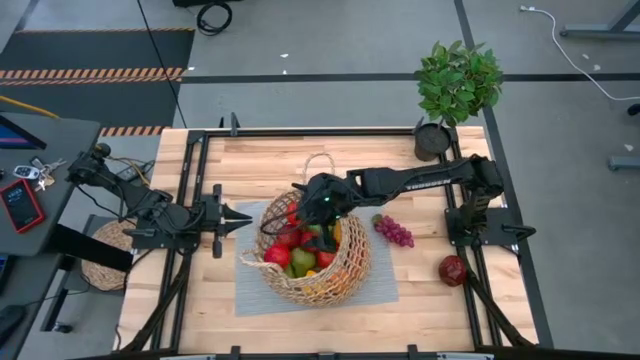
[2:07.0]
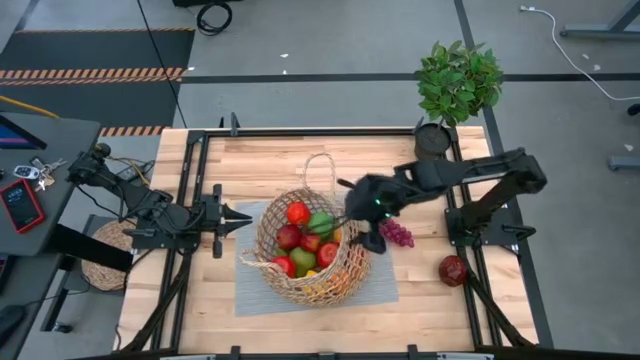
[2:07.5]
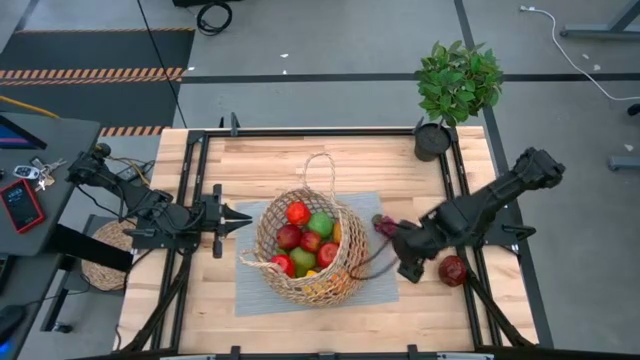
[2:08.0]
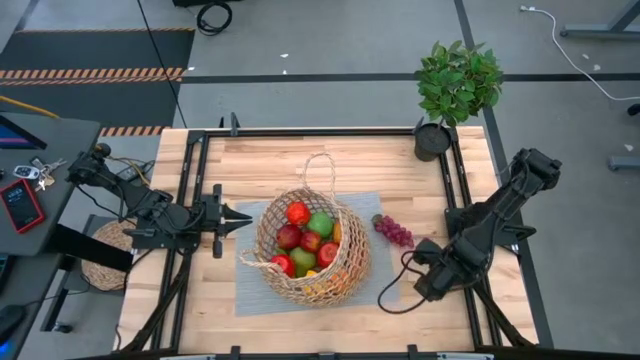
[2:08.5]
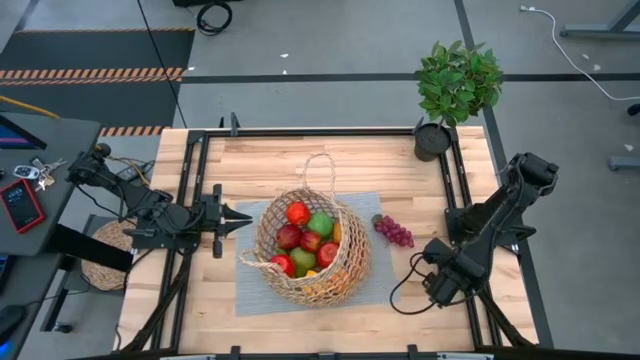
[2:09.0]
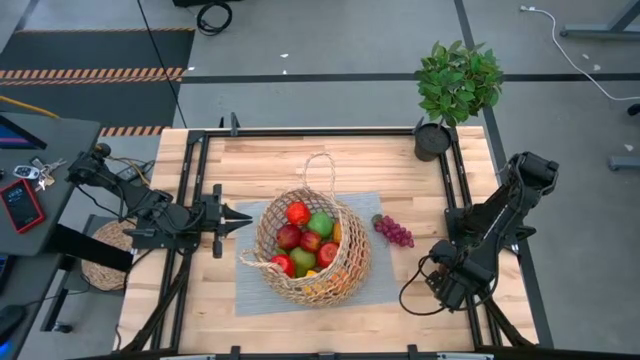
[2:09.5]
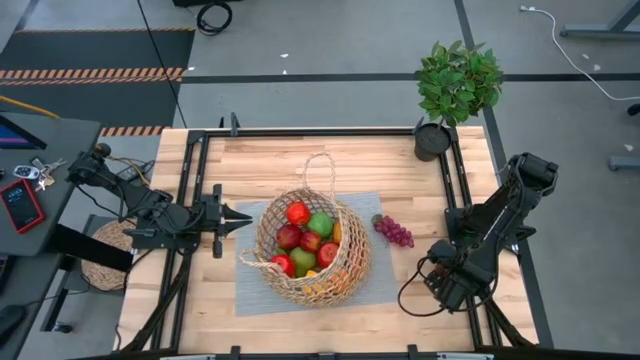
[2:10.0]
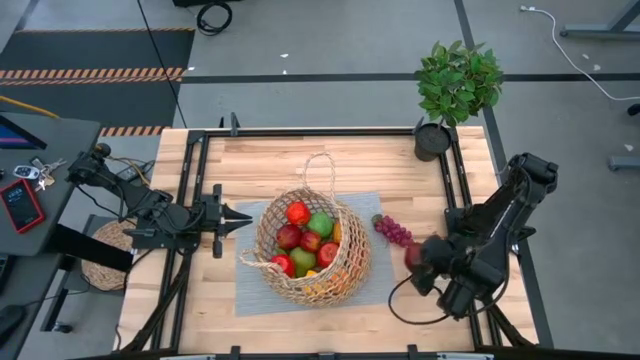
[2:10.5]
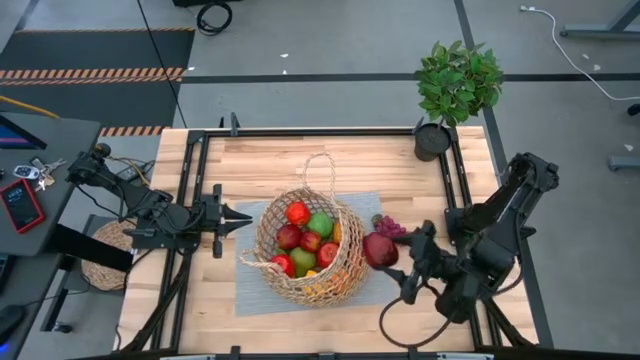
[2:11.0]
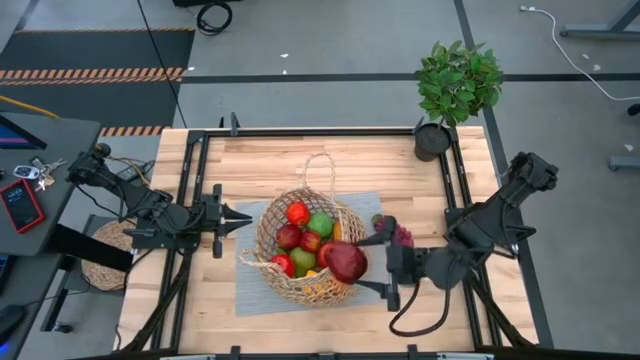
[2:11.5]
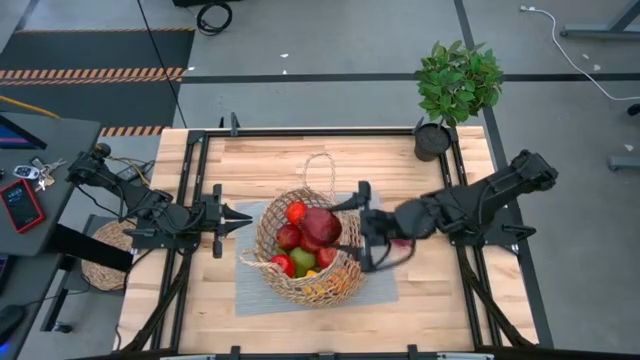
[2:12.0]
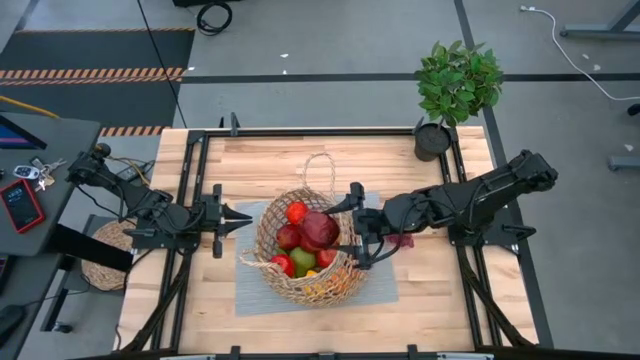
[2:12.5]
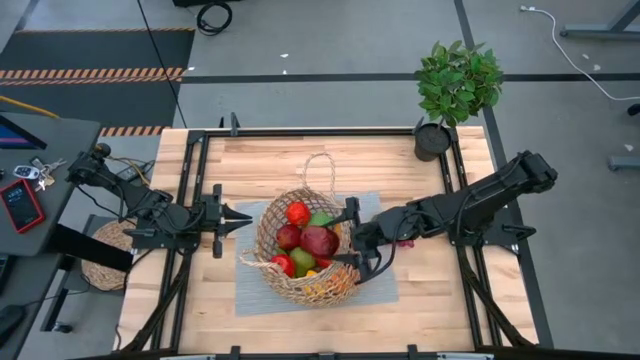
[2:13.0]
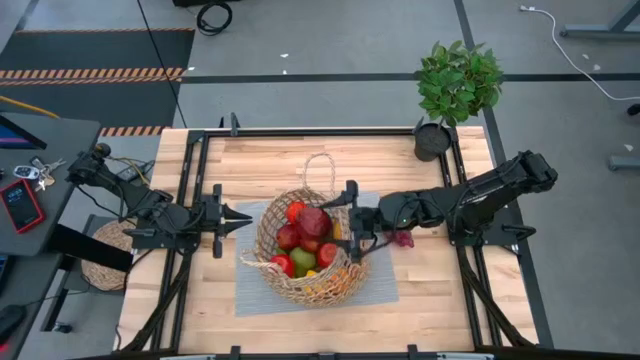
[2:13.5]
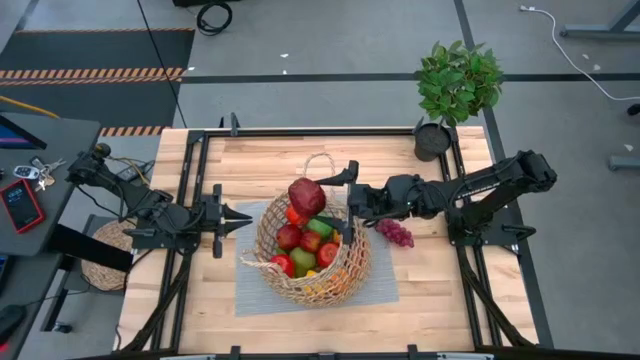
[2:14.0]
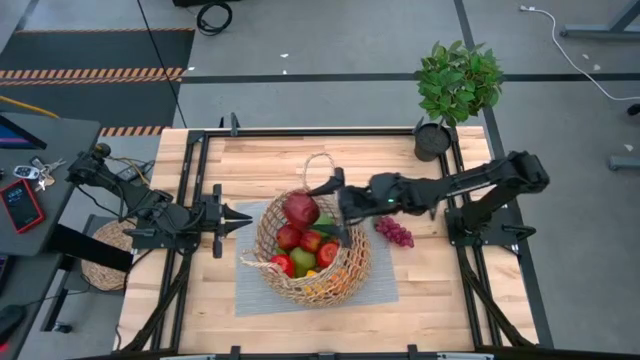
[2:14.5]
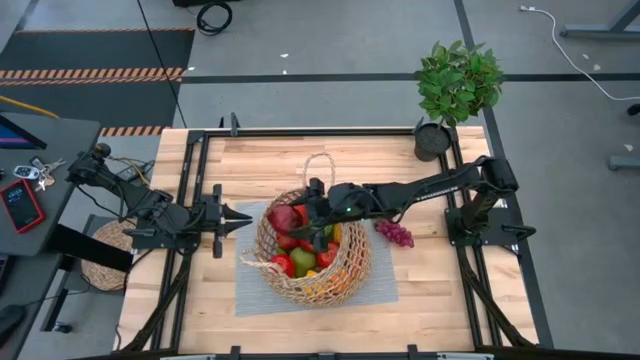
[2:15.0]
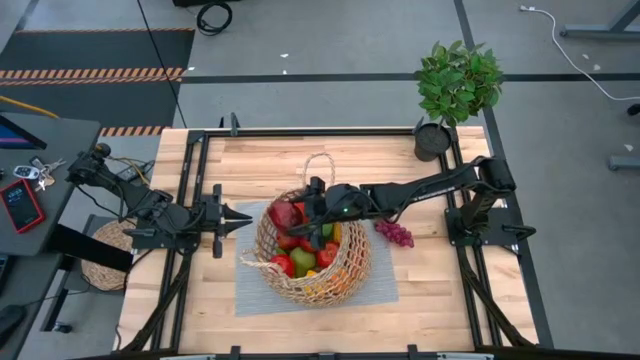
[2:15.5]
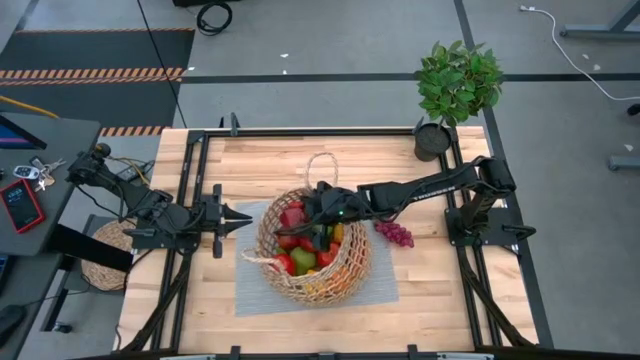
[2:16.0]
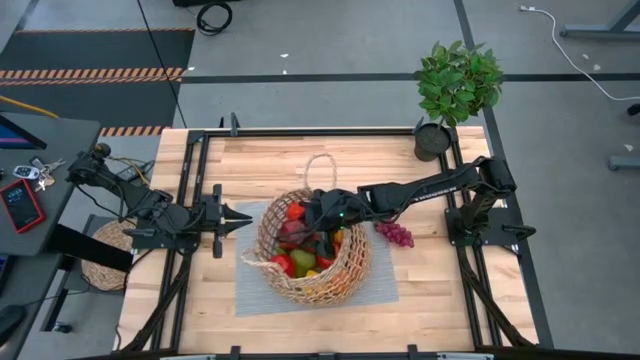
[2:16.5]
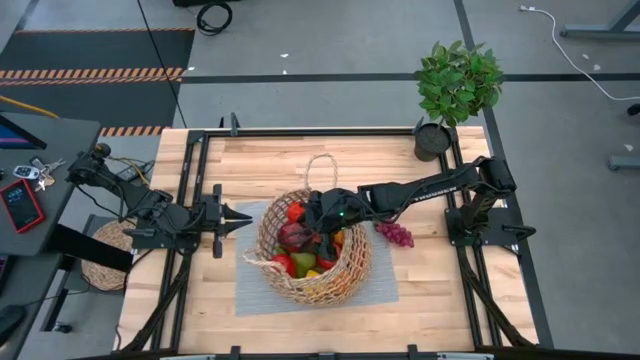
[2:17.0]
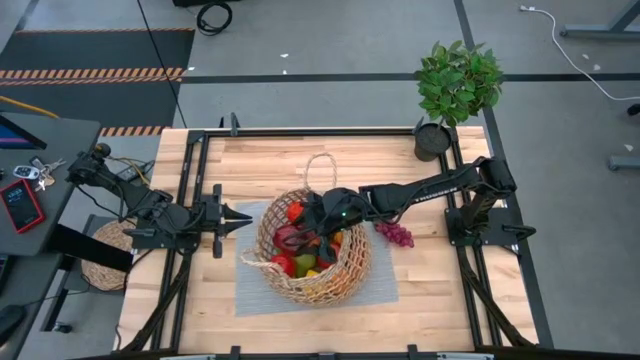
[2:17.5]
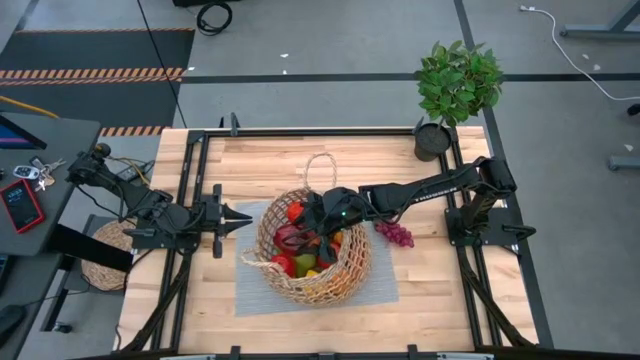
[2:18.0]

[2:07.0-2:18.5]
Task: Build produce basket
Put the red apple into the basket

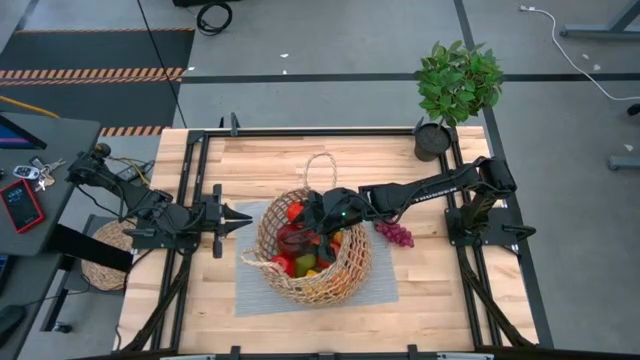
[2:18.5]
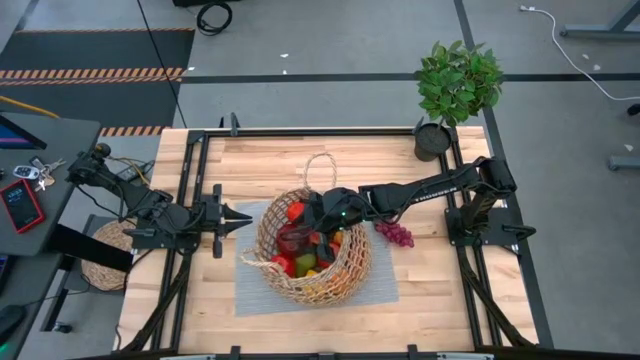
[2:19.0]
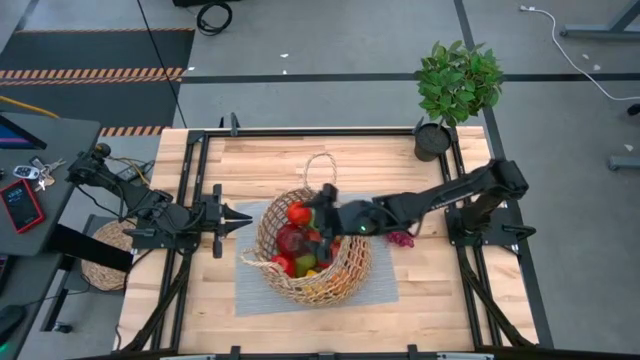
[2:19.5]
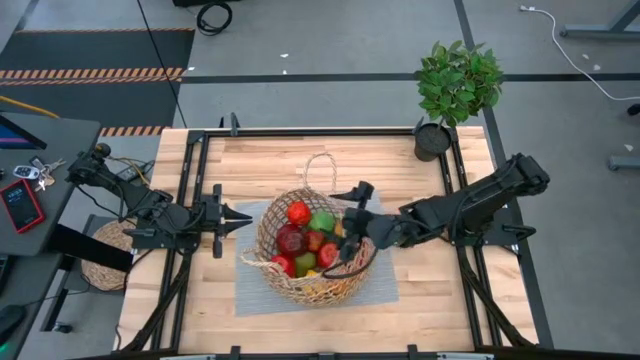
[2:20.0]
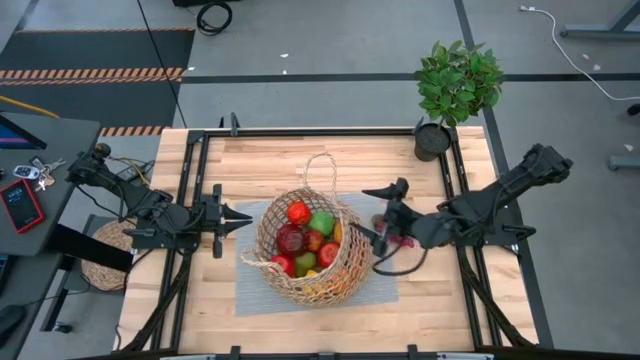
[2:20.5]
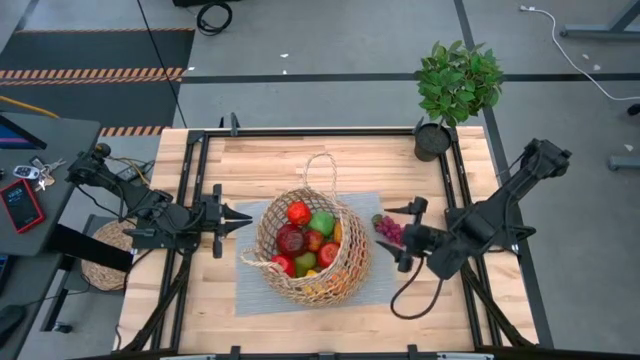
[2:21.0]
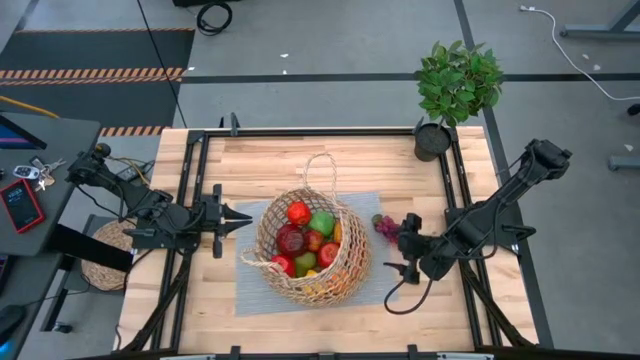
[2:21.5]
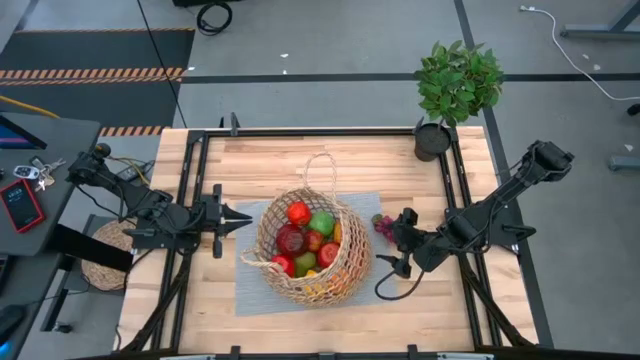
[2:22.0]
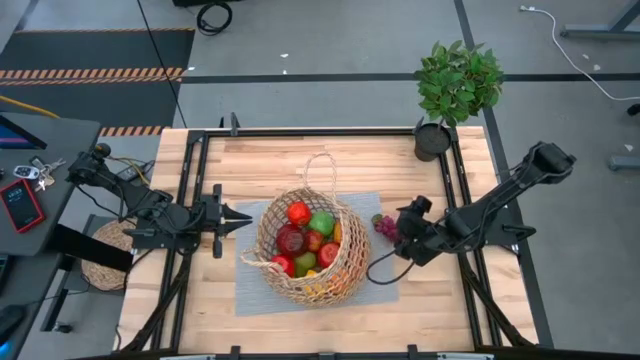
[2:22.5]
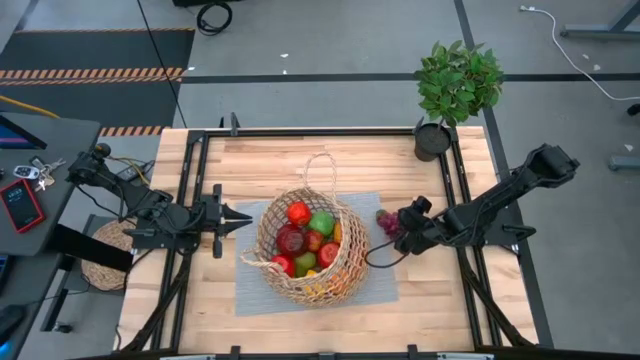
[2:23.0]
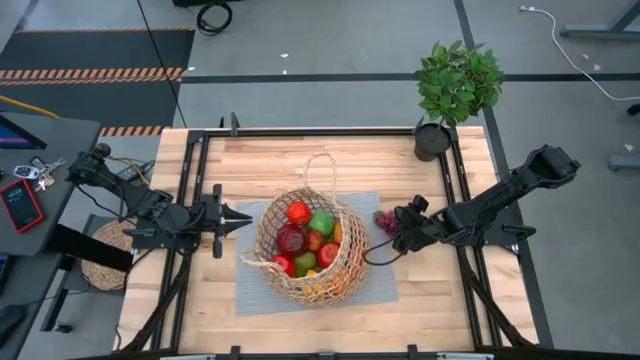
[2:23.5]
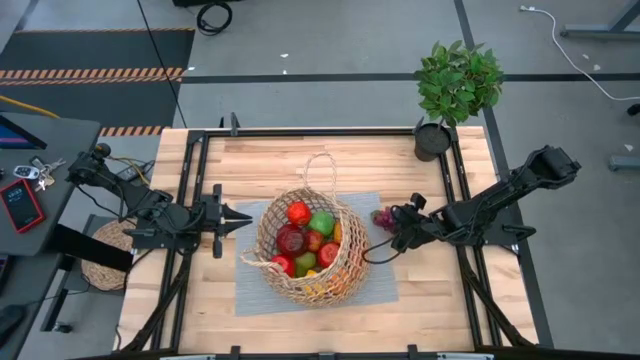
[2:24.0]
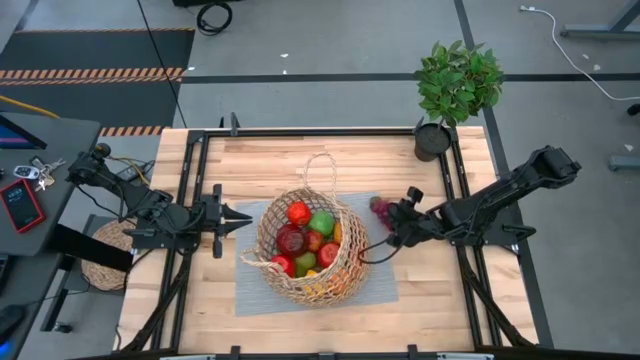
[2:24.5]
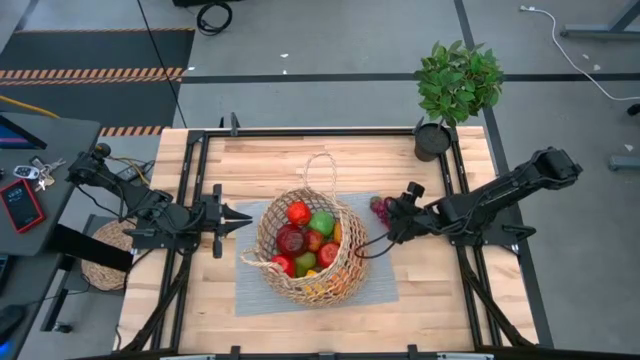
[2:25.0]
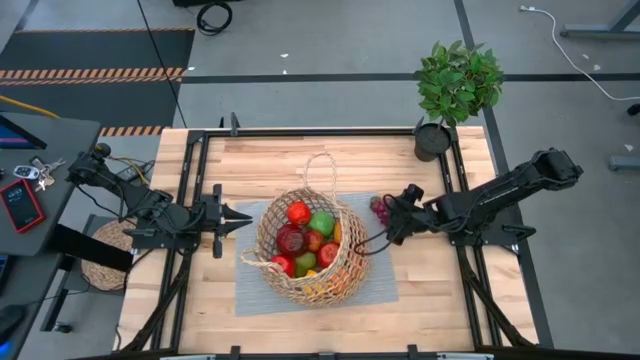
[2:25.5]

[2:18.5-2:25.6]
Put the grapes into the basket

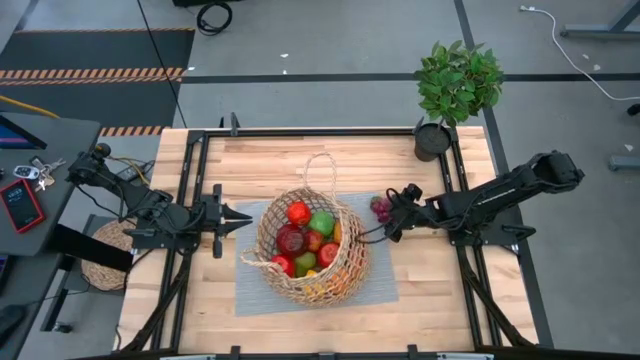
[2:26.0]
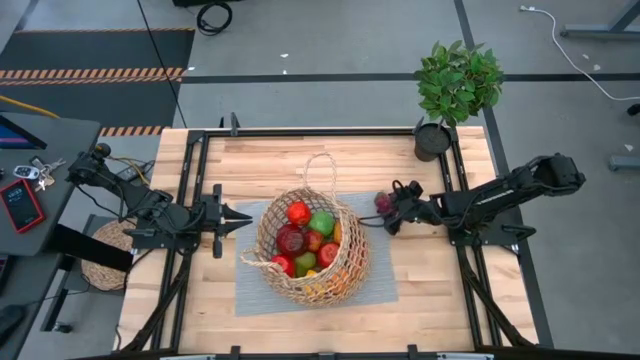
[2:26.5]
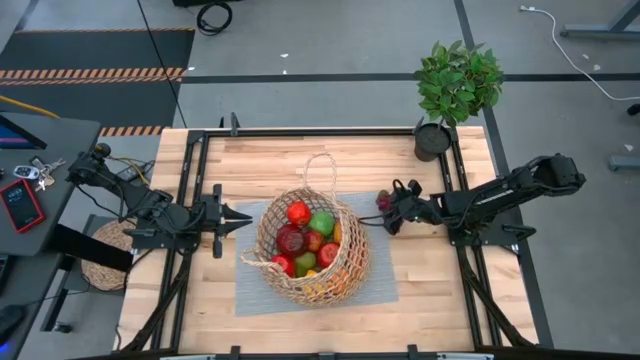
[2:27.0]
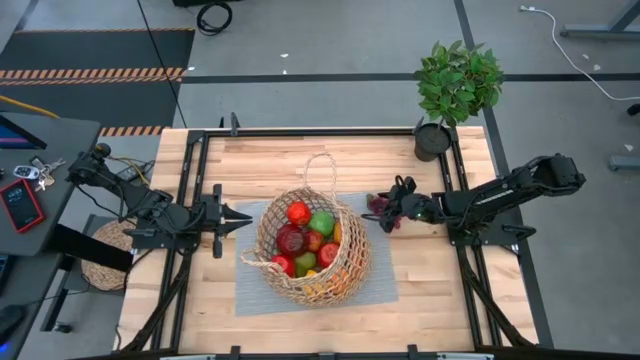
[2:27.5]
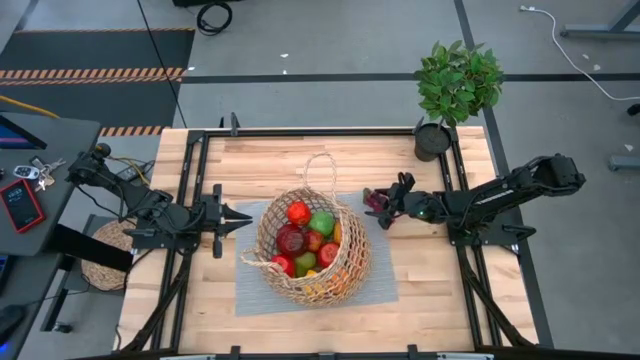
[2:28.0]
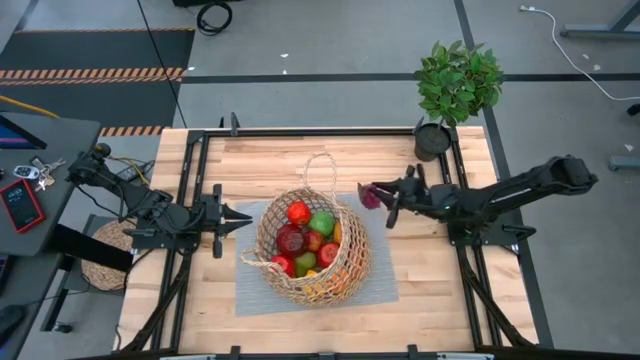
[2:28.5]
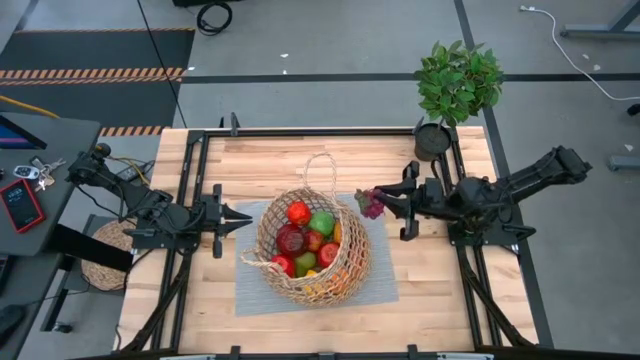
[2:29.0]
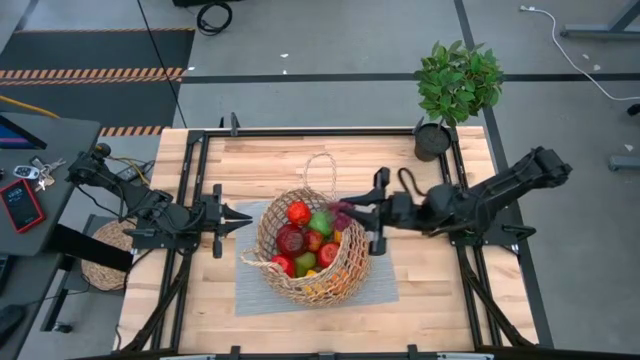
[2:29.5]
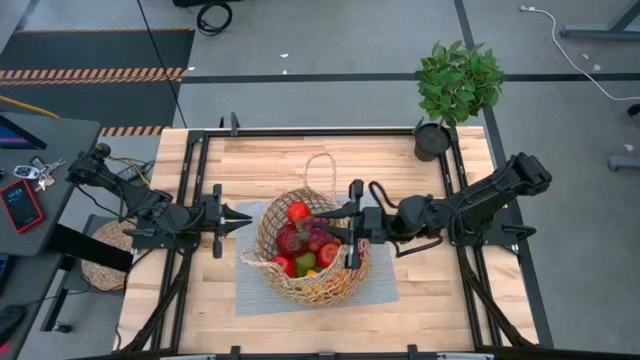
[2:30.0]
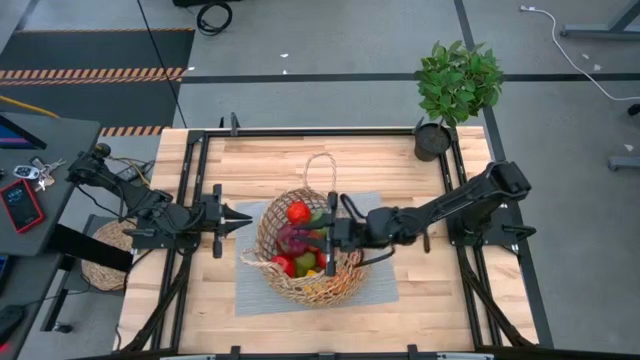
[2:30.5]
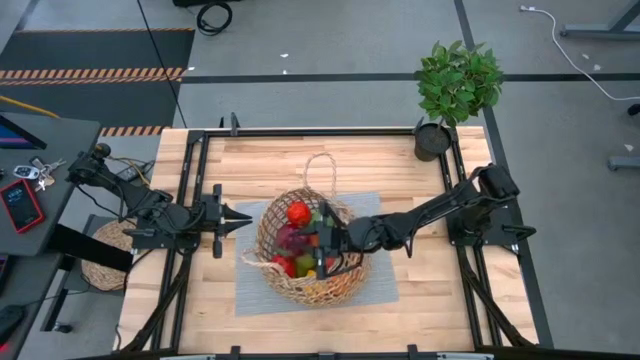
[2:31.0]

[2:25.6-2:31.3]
Put the grapes into the basket
